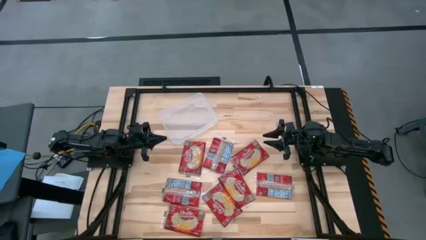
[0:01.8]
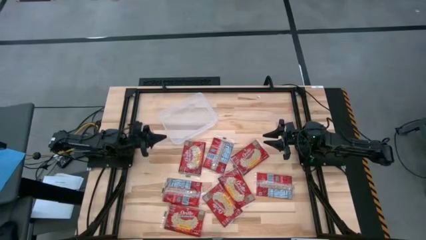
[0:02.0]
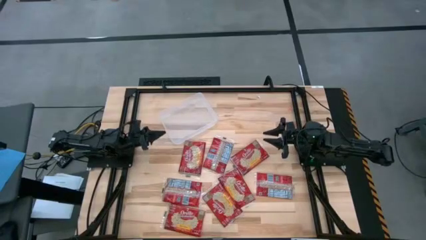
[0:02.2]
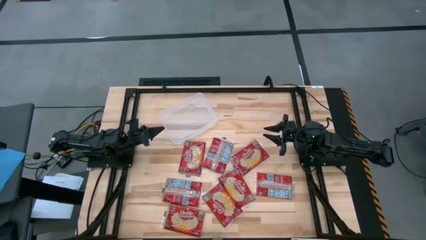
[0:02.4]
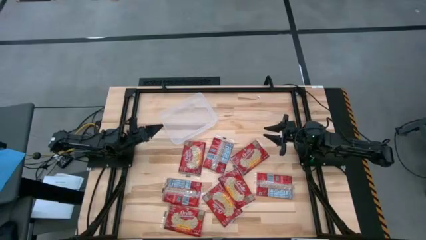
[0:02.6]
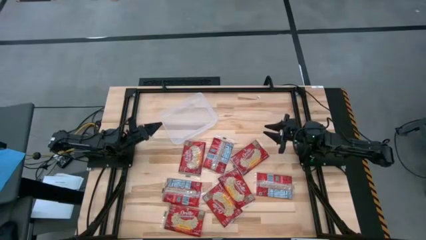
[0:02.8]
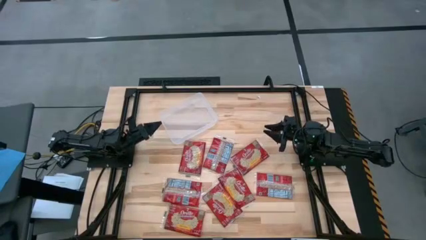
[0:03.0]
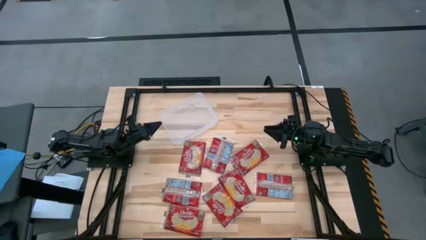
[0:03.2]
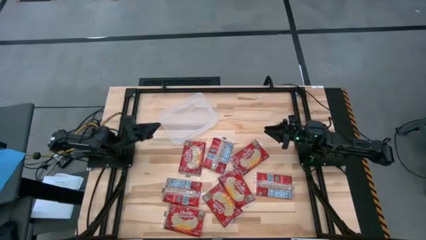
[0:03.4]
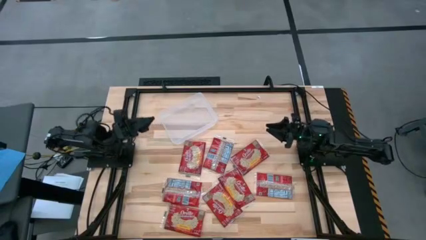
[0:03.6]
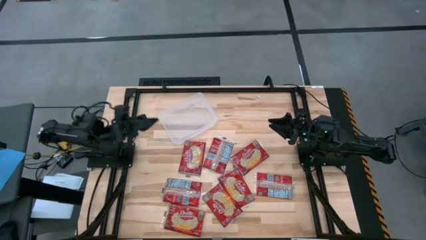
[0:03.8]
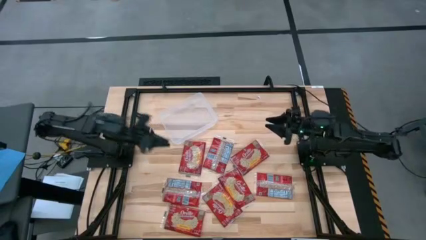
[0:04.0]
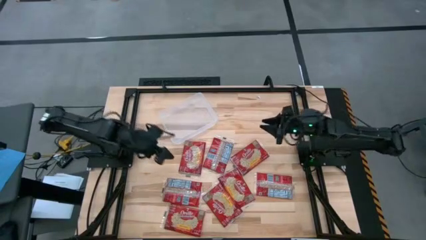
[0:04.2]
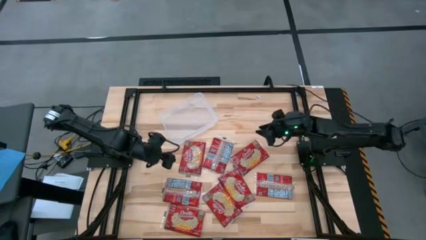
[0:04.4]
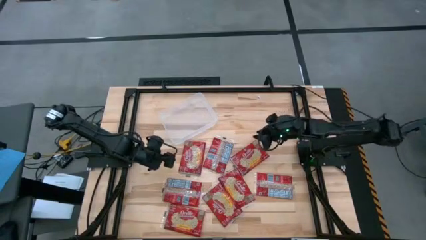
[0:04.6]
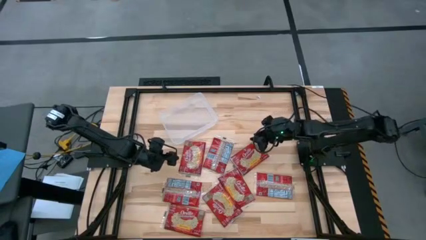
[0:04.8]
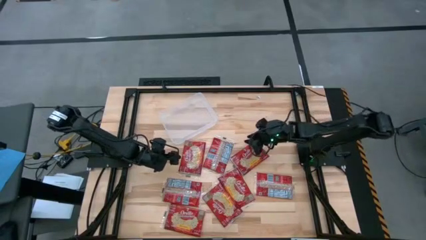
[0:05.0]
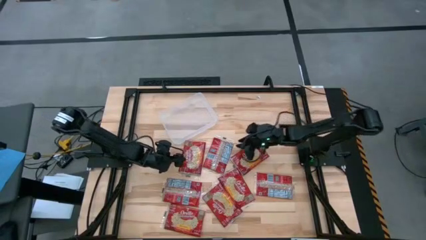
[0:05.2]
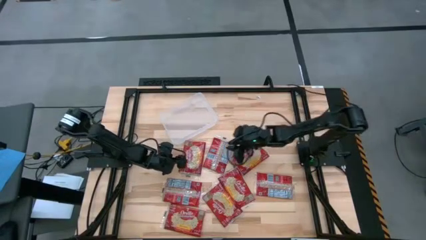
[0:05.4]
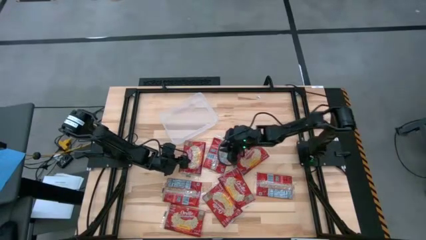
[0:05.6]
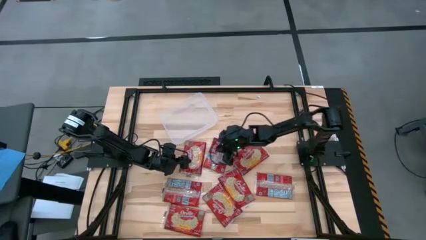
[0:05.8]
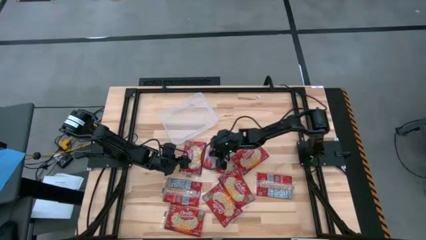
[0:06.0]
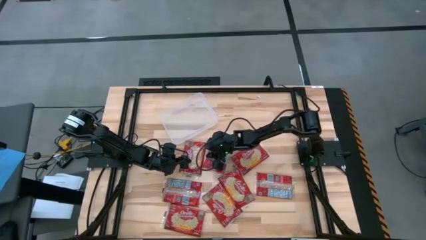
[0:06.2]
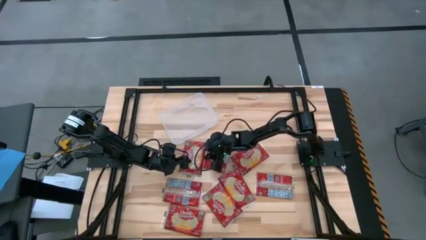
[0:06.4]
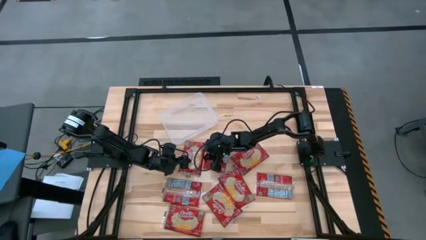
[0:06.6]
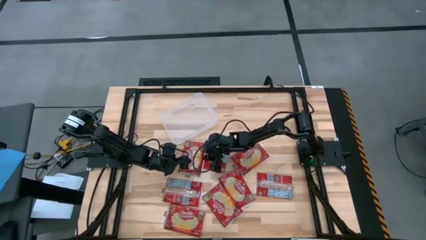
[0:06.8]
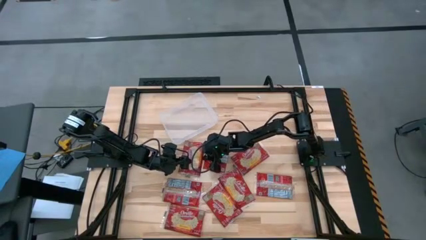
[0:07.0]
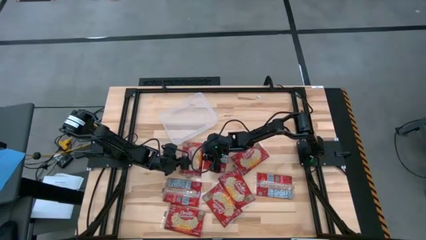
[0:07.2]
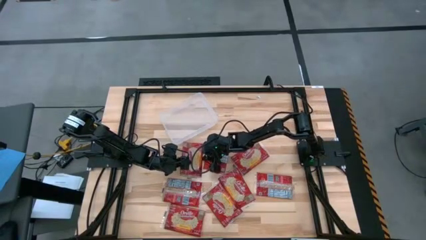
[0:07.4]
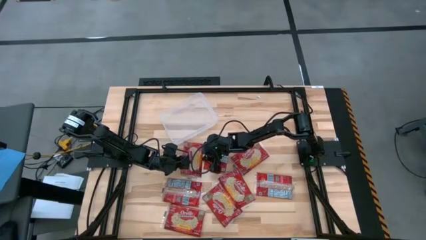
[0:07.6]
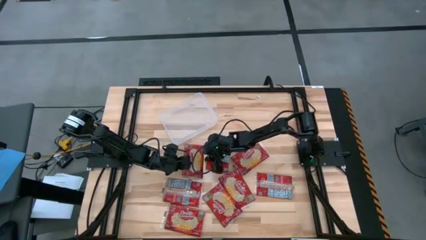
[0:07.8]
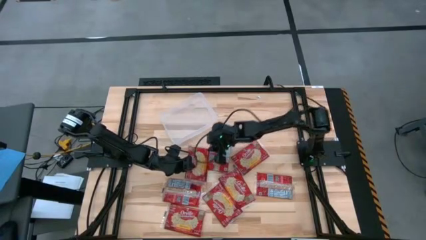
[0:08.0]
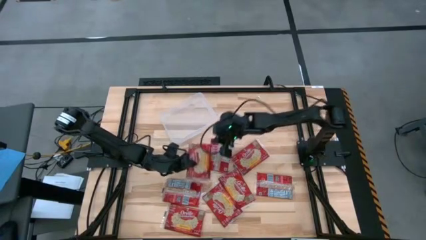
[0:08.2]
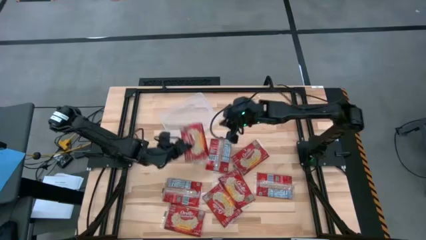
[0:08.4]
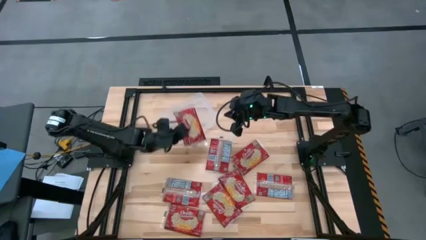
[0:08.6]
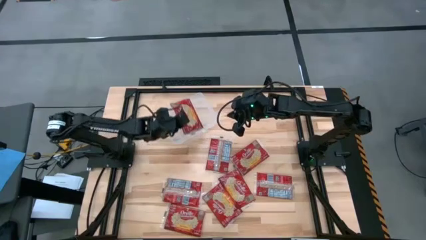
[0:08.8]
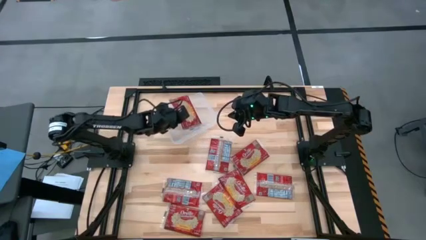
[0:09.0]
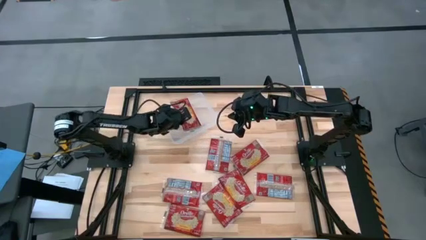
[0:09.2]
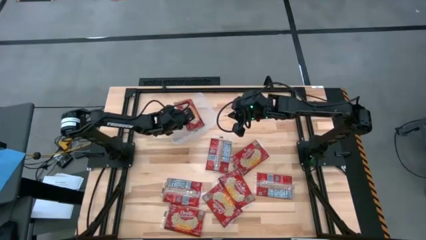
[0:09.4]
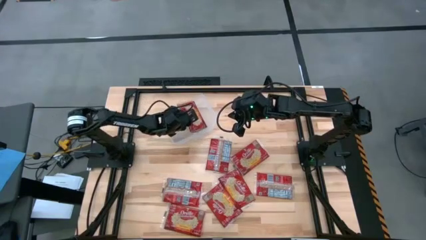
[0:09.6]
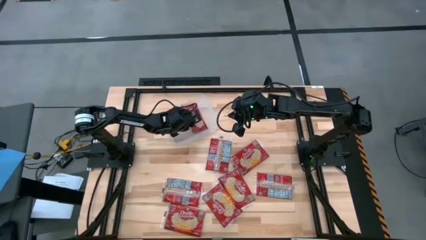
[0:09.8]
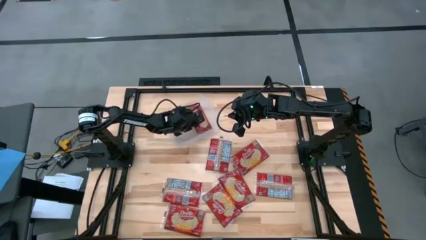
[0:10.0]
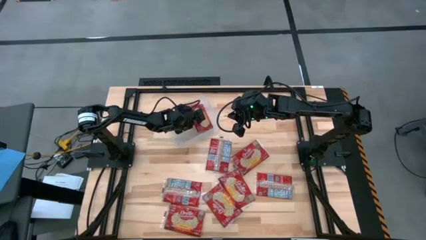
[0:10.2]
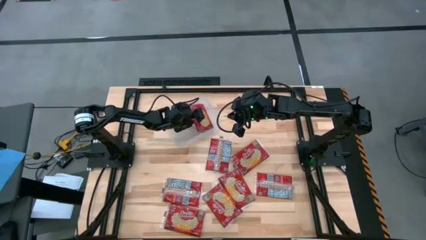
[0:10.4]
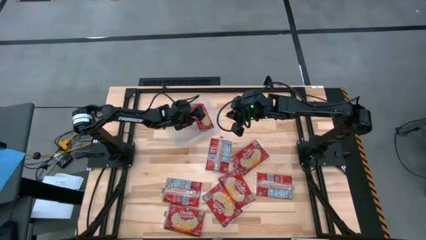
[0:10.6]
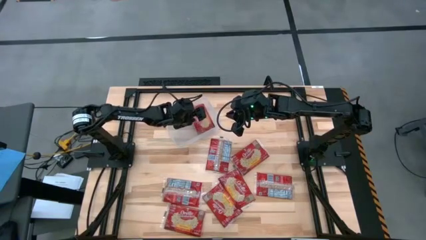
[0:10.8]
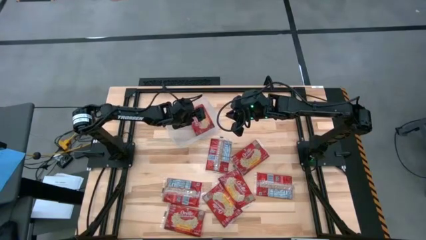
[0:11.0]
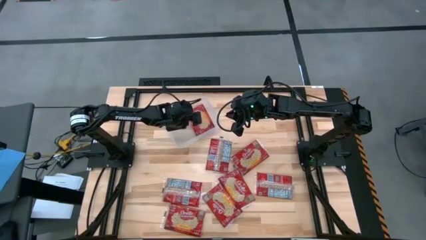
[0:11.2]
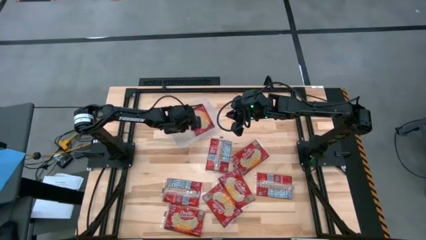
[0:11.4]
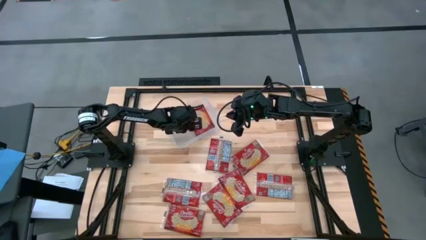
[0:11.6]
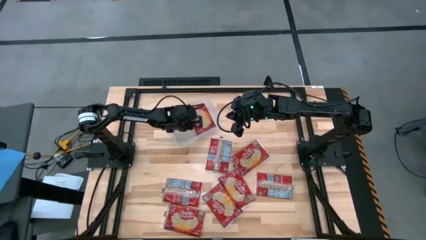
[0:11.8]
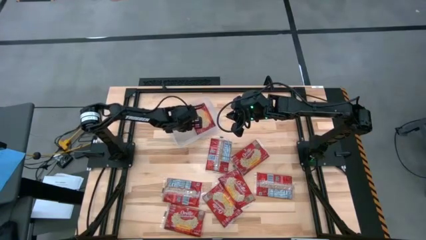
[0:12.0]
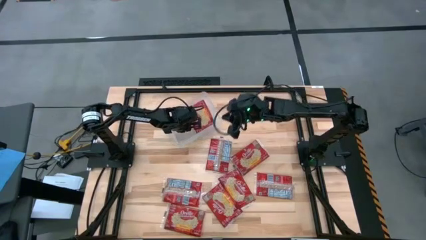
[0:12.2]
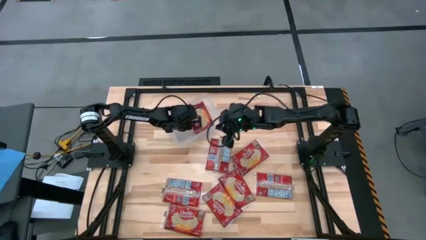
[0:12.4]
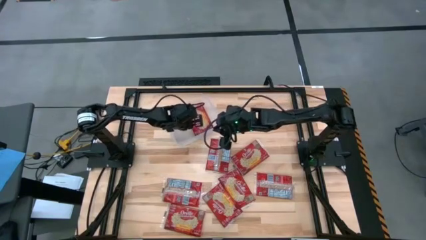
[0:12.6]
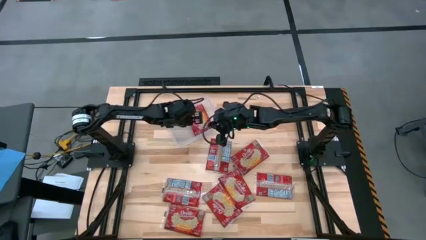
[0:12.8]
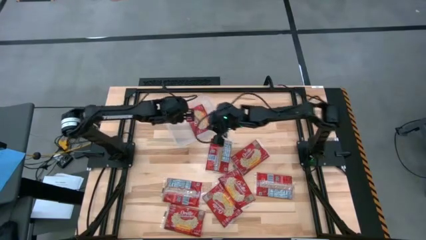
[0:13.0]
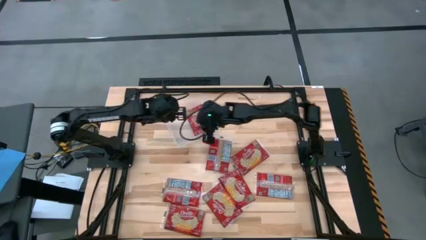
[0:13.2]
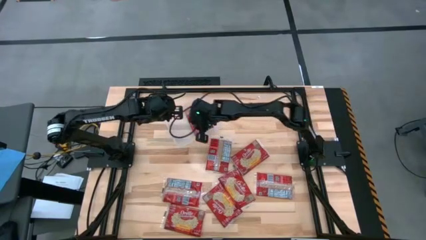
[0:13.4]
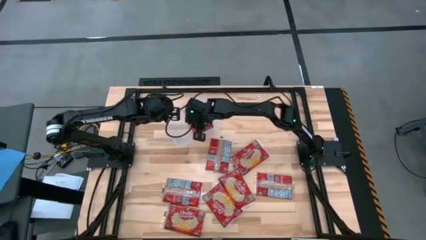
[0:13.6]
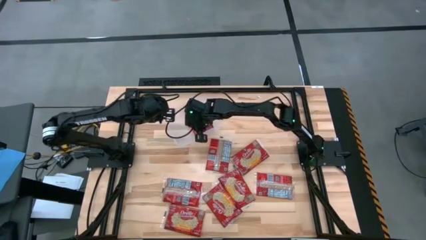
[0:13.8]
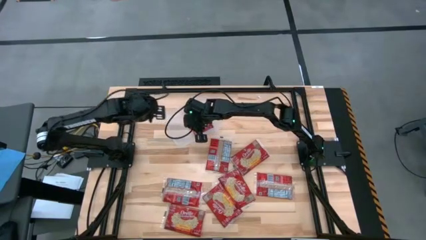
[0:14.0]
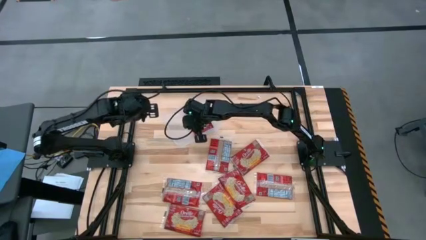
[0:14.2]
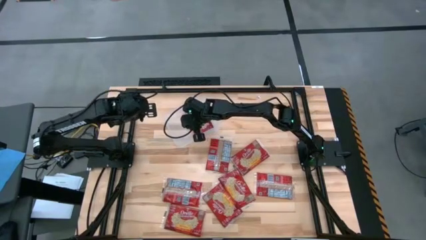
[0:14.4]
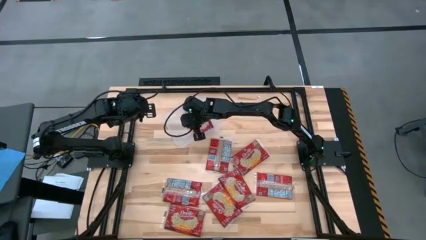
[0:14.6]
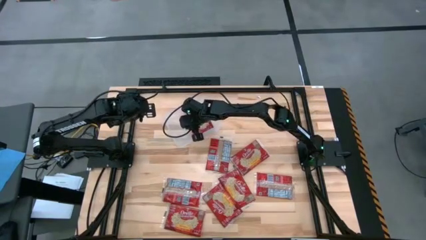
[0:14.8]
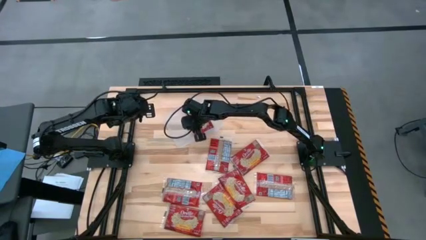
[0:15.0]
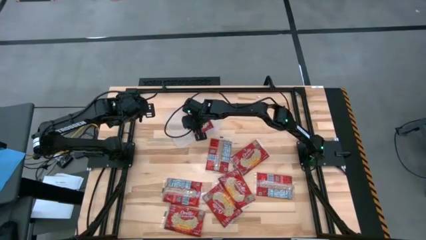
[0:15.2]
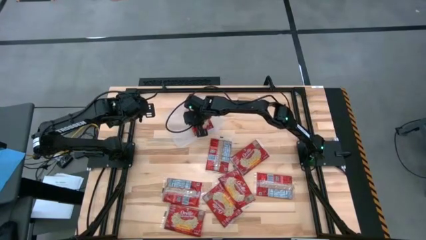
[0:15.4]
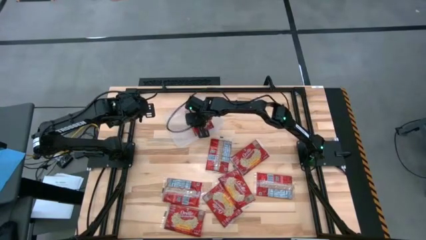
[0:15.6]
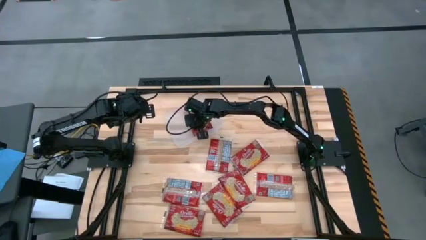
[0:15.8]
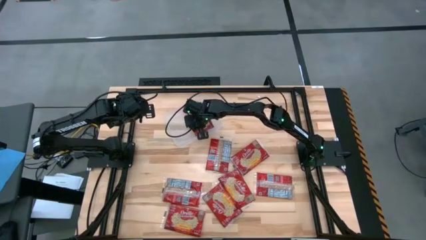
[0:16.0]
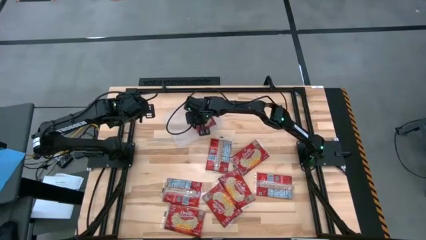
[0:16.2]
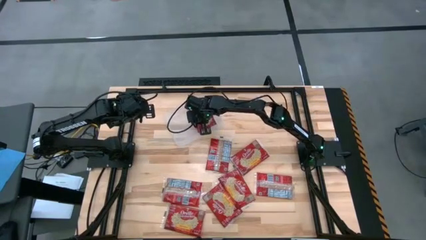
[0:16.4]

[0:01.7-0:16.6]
Task: Sort popcorn bags into baskets
Put the red popcorn bag into the transparent bin
